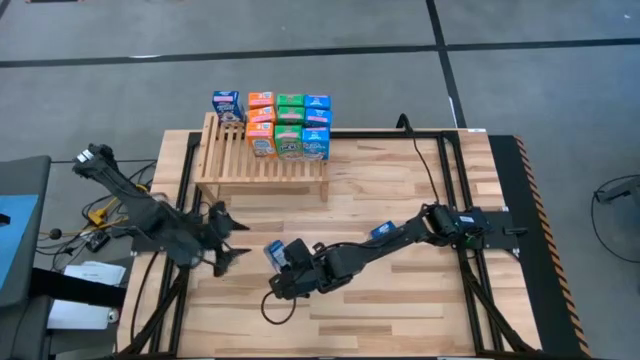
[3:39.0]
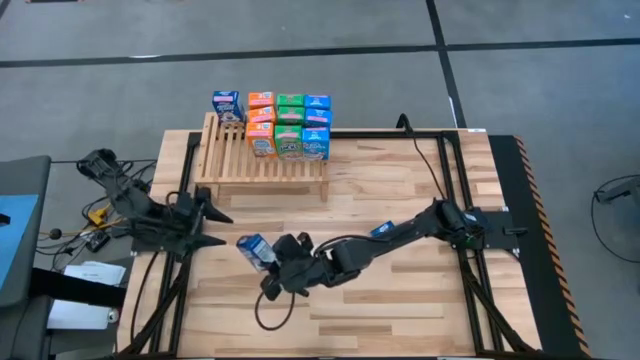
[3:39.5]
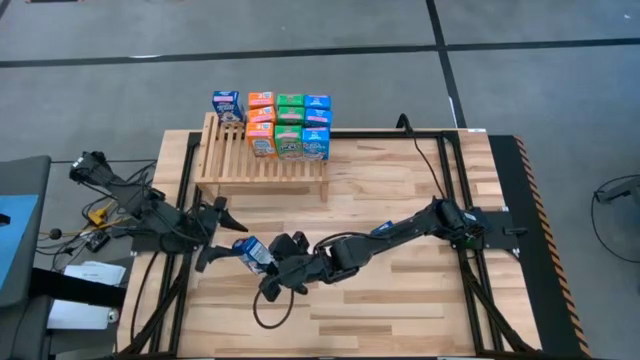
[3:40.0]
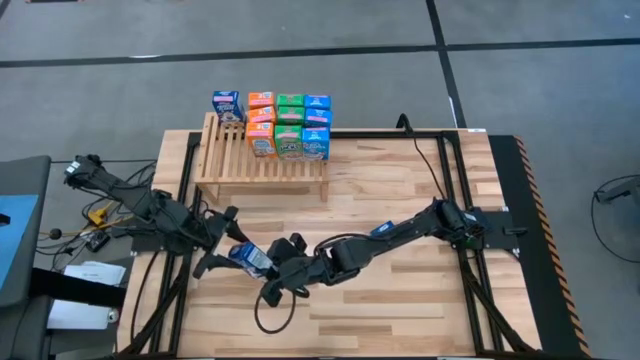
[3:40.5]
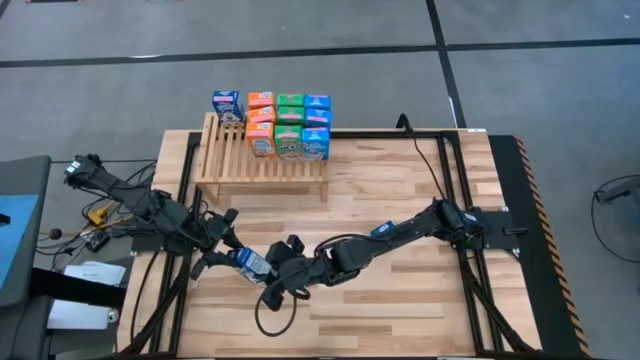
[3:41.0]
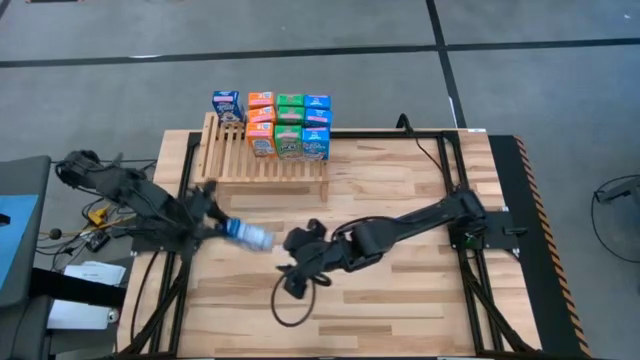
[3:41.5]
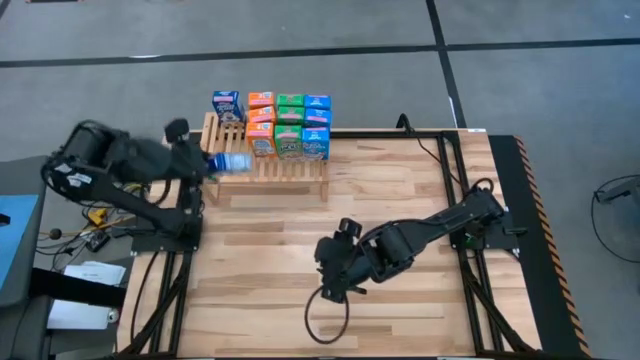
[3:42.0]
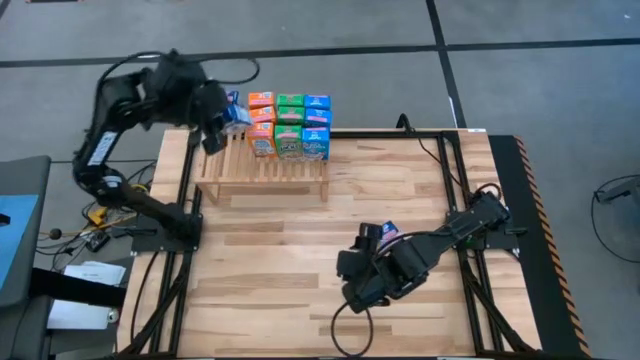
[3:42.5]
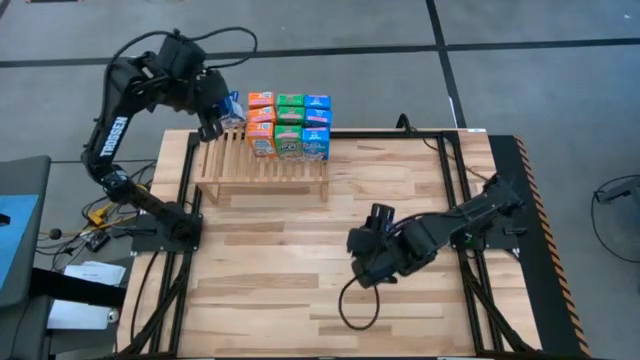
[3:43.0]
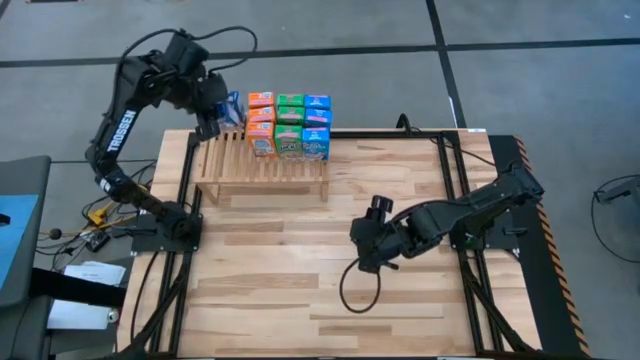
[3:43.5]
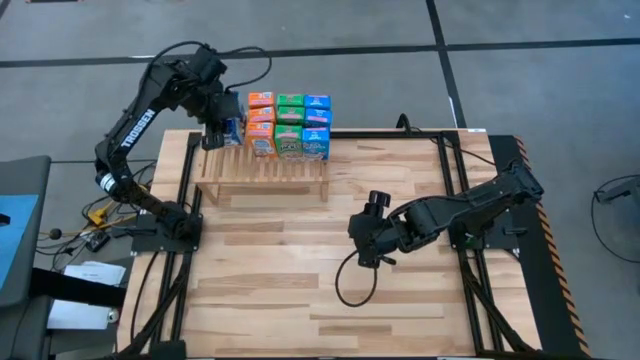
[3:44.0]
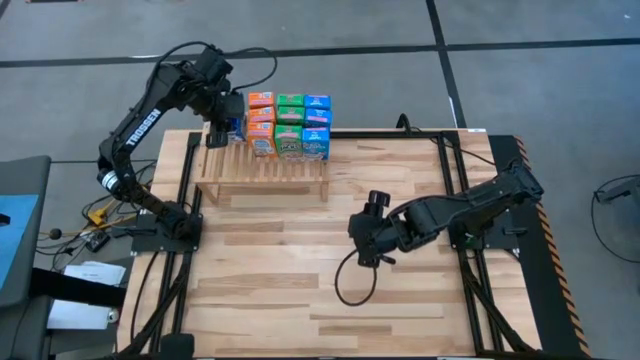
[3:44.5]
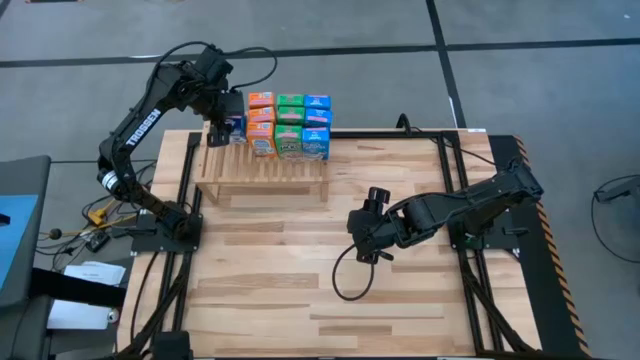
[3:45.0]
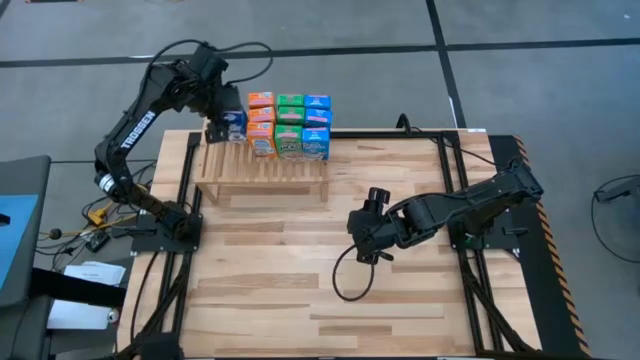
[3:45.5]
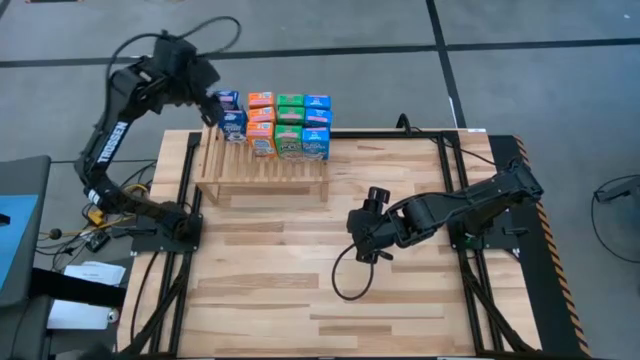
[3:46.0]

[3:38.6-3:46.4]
Task: Stack cereal on shelf
Put the left blue cereal box on the shelf aligned with the other blue cereal box

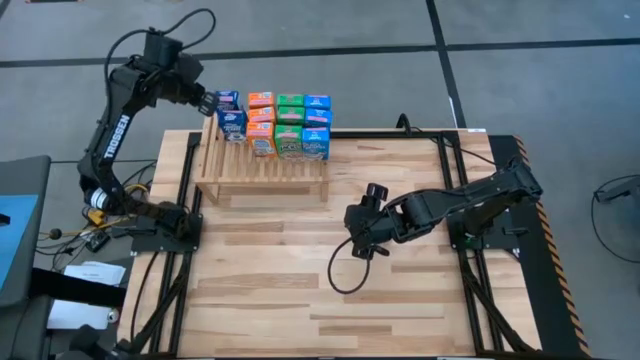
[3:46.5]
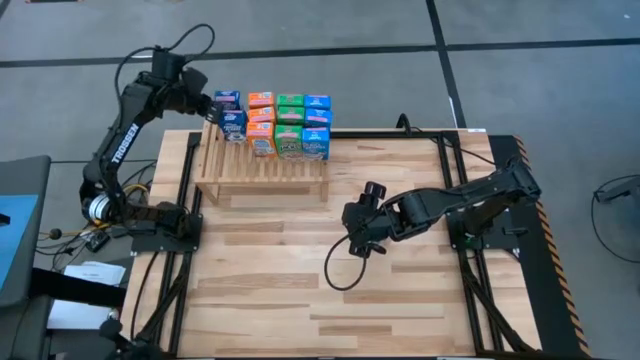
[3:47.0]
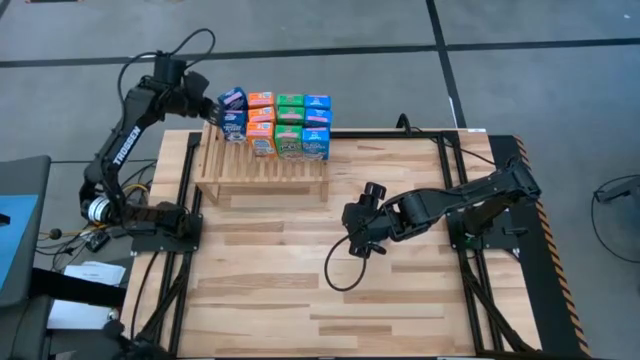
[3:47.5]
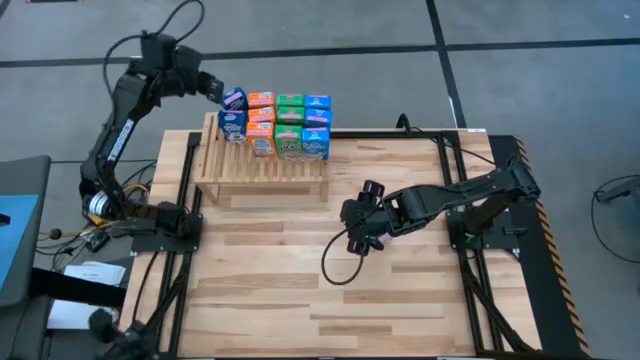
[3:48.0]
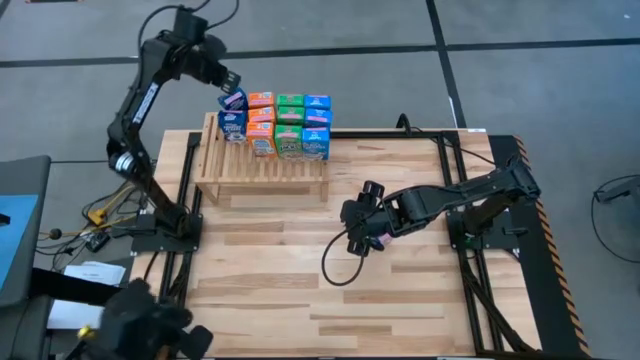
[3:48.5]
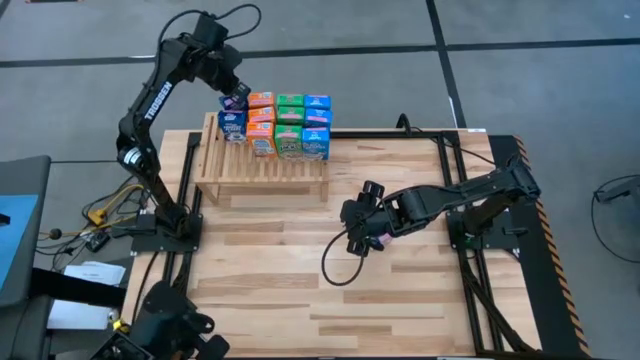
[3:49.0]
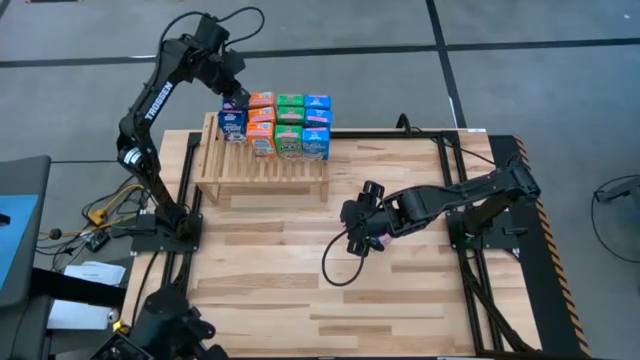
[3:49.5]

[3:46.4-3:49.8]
Adjust the blue cereal boxes on the shelf

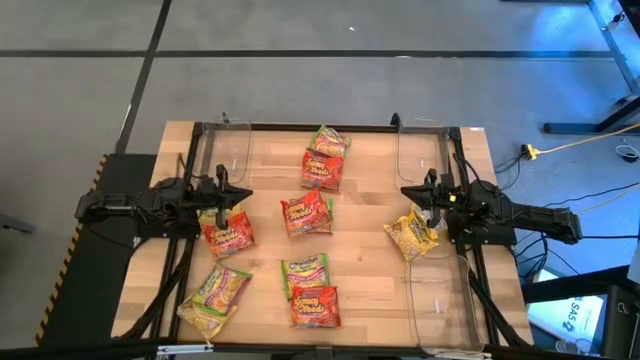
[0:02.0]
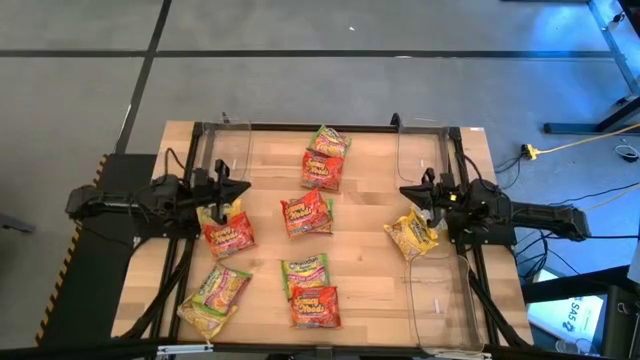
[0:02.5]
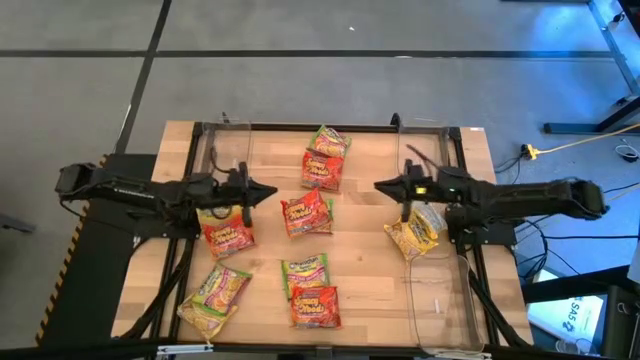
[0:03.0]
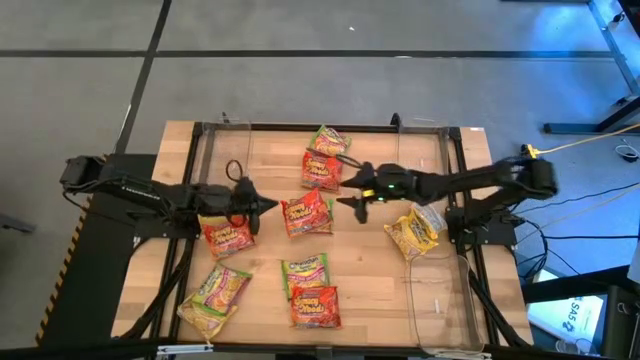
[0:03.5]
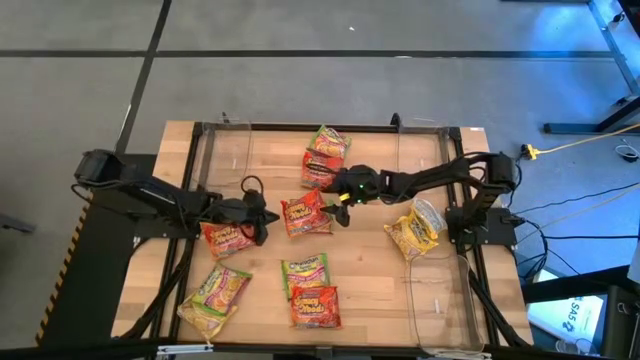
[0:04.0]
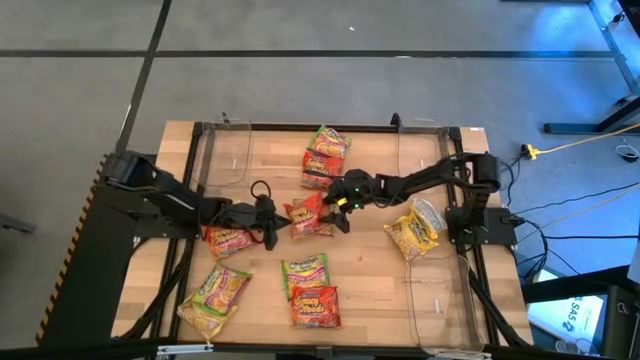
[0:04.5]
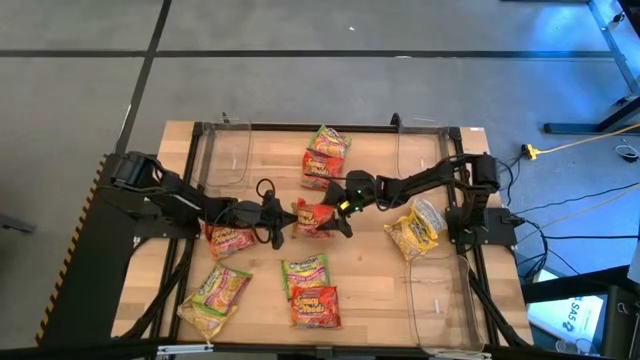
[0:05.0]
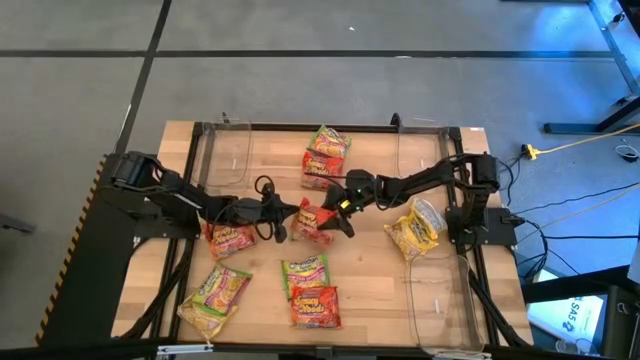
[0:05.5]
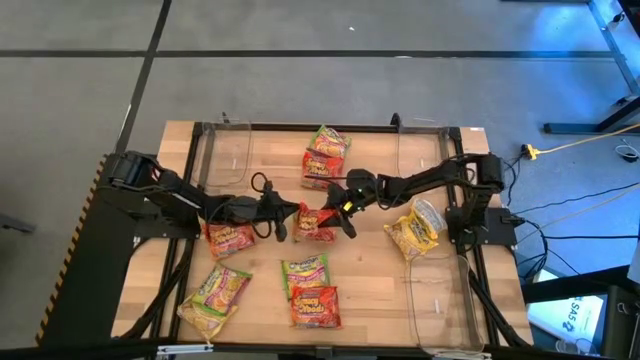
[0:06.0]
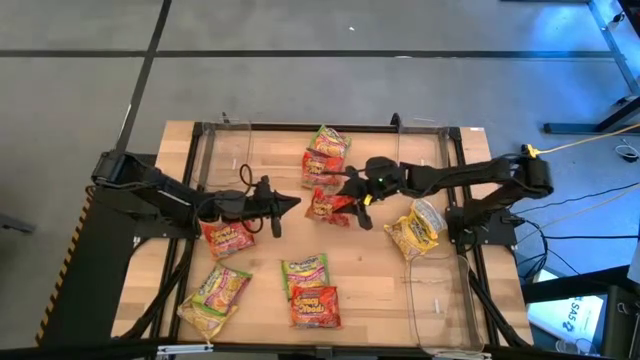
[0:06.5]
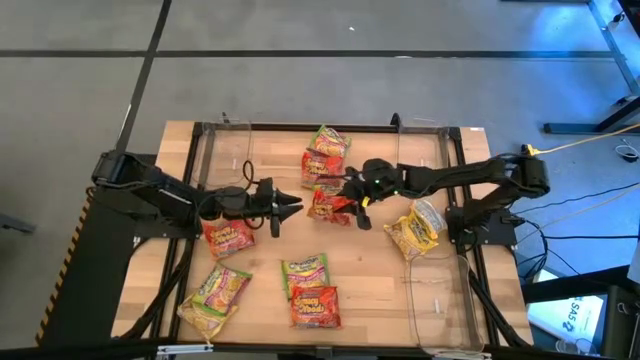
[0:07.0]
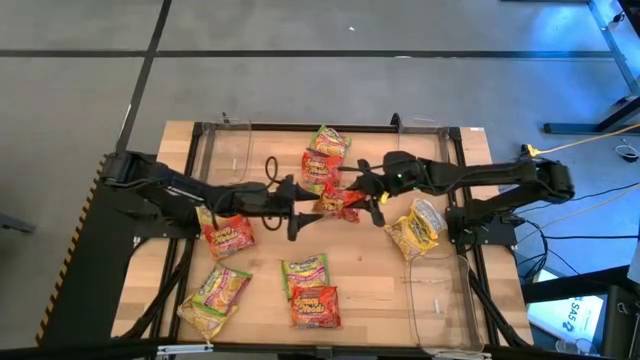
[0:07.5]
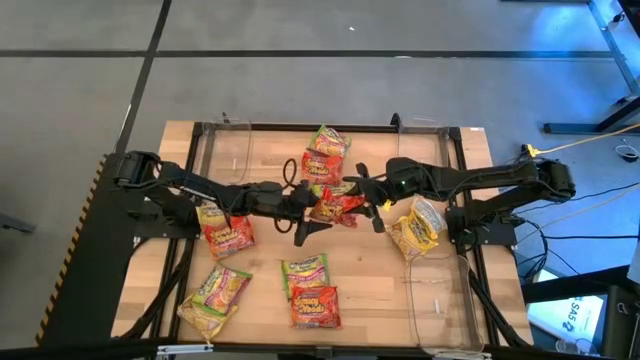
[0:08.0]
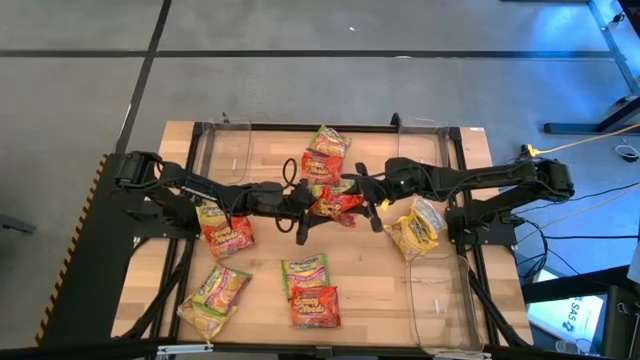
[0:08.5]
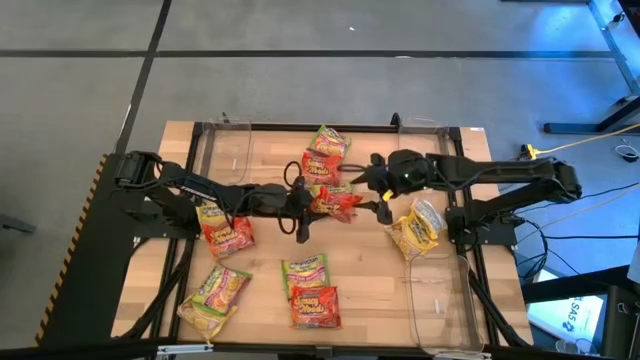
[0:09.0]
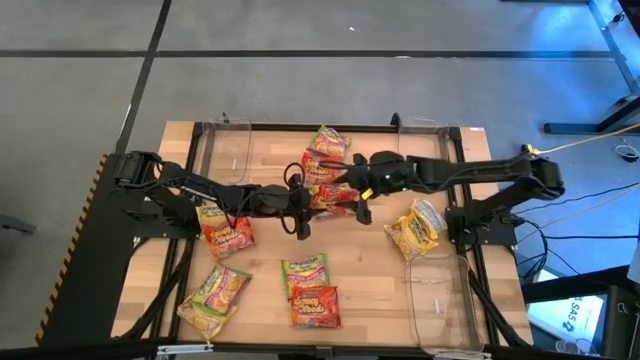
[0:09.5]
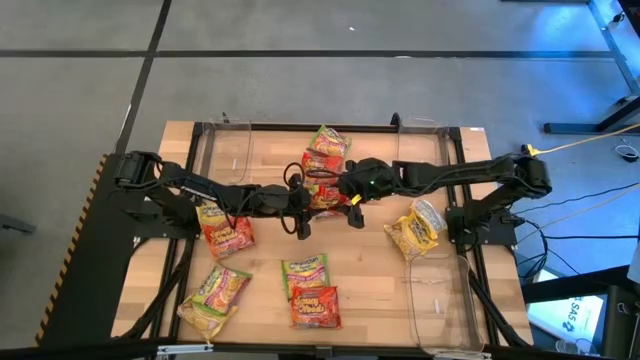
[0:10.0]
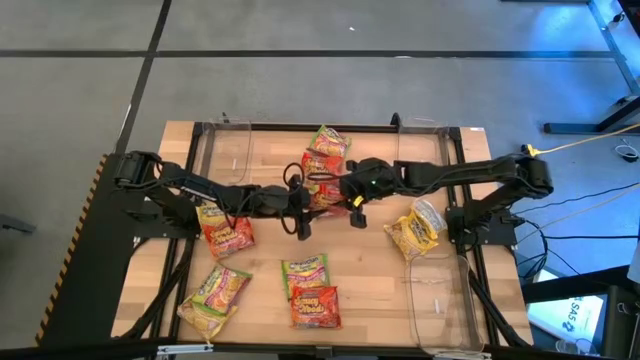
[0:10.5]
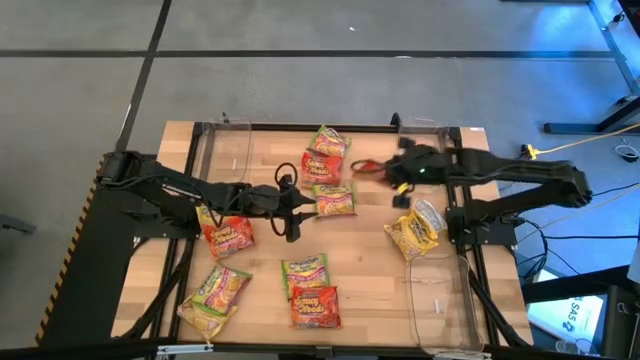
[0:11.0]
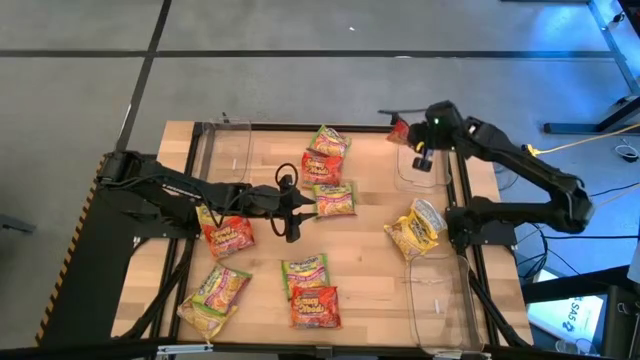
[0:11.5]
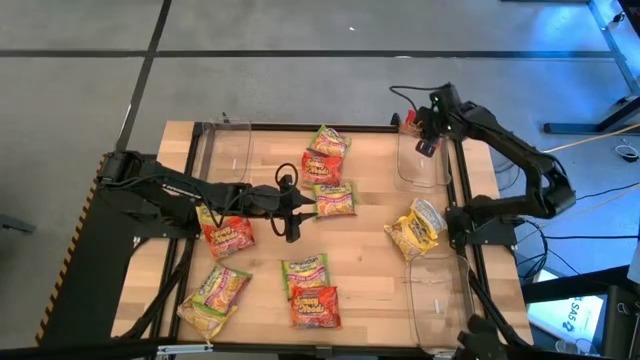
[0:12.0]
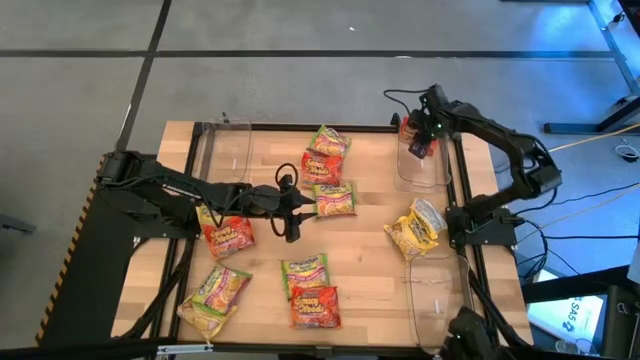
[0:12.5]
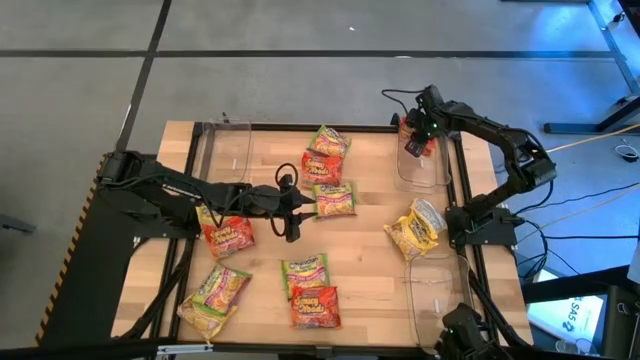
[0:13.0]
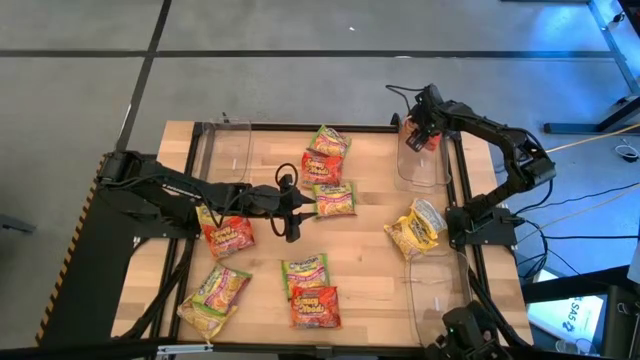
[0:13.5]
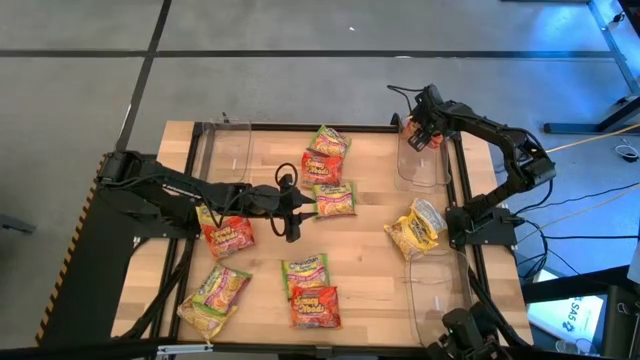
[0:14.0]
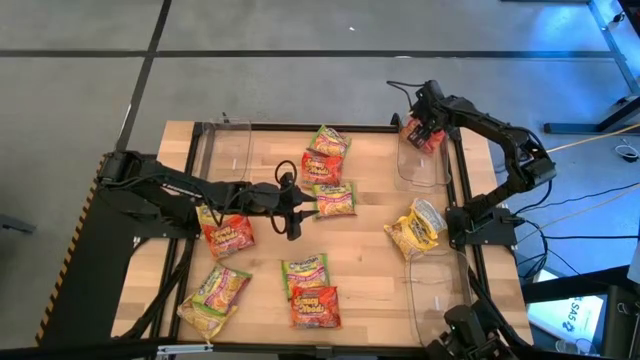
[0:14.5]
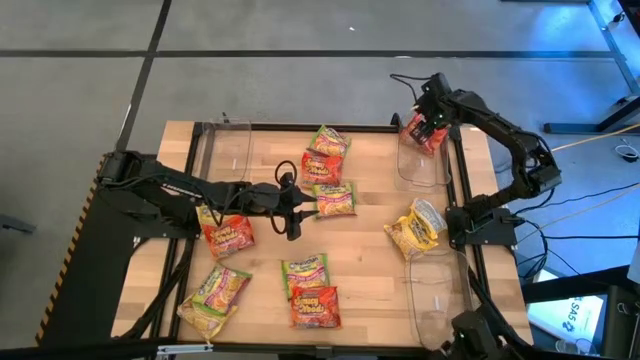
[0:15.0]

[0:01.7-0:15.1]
Task: Sort Maruchan noodles
Put the orange noodle pack into the top right transparent bin
